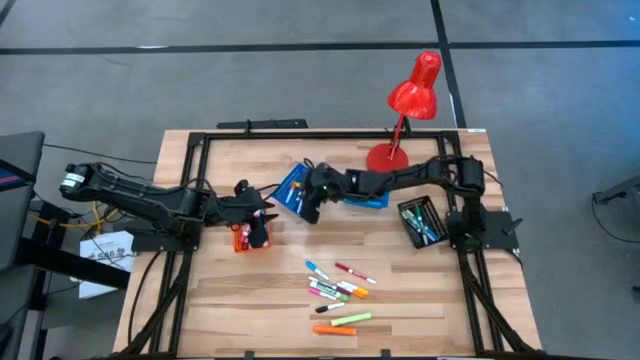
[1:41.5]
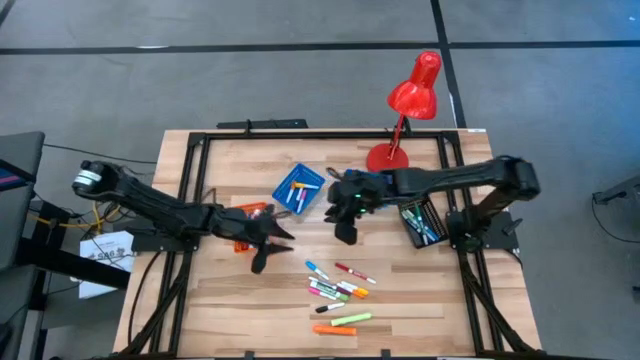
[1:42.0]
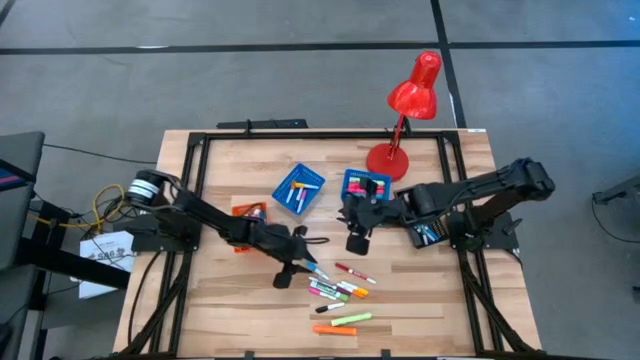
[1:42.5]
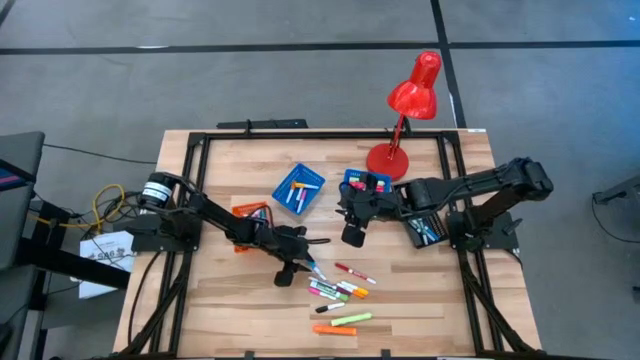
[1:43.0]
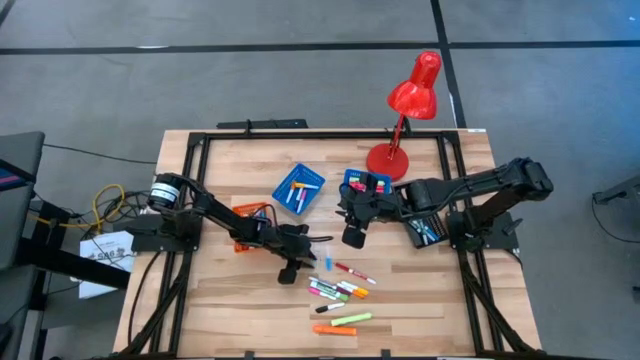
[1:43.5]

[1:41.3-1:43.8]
Task: Pick & Place Markers
Put the small light blue highlighter pen into the left blue bin

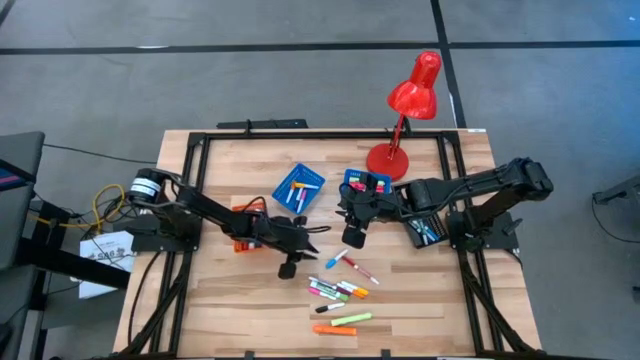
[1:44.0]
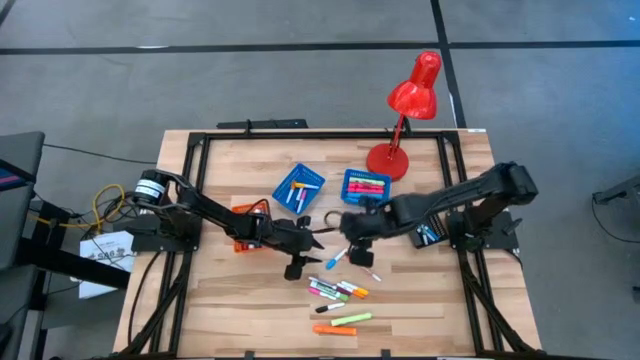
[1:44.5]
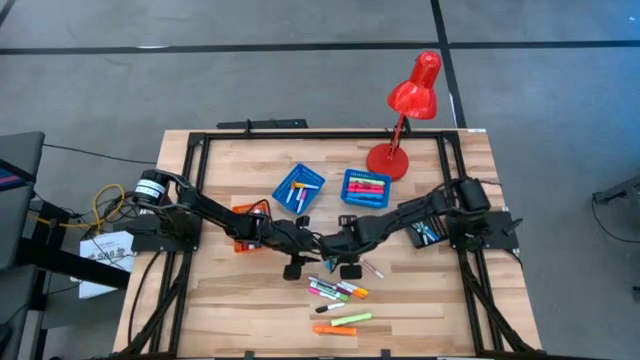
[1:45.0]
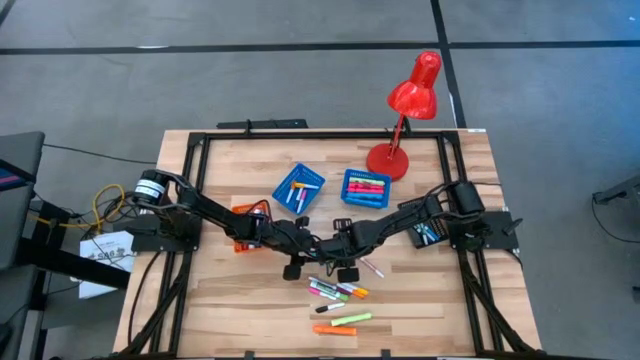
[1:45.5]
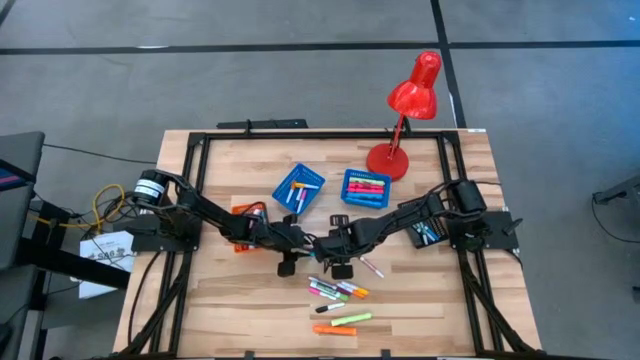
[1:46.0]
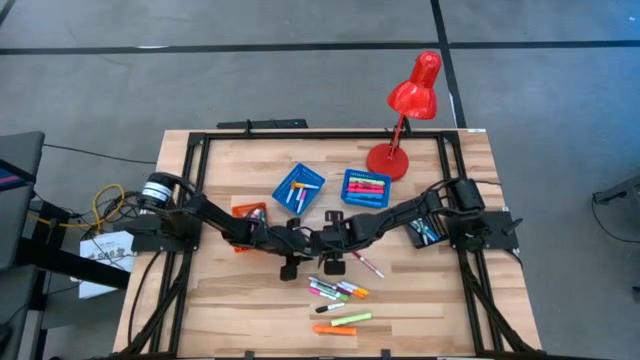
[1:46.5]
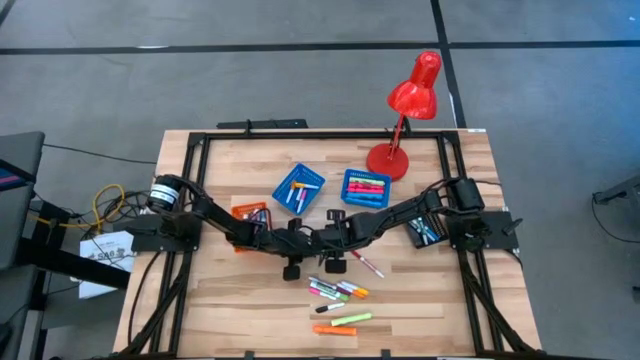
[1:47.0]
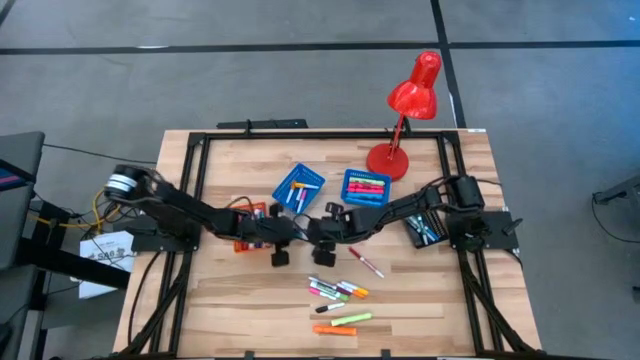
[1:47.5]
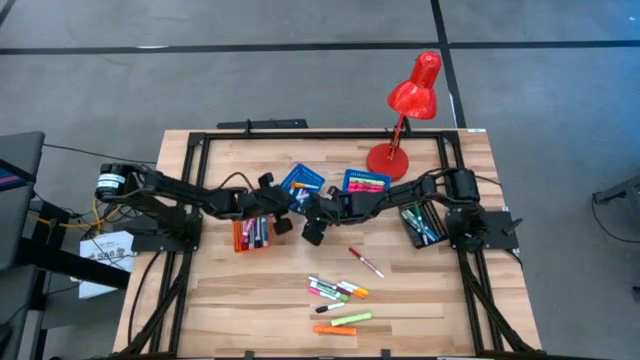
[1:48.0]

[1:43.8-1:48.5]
Put the small light blue highlighter pen into the left blue bin

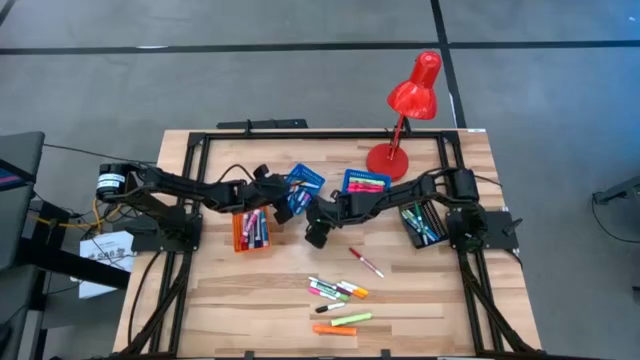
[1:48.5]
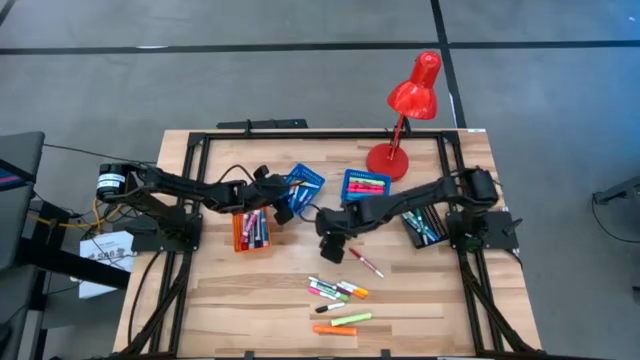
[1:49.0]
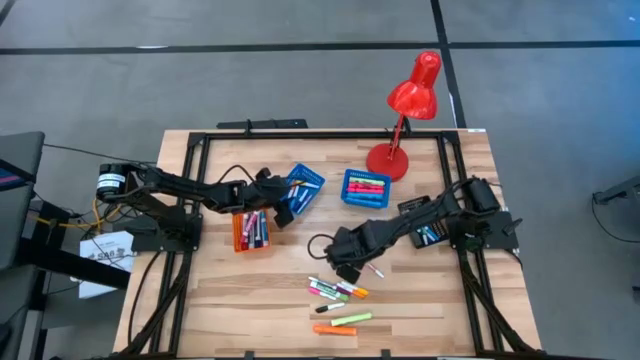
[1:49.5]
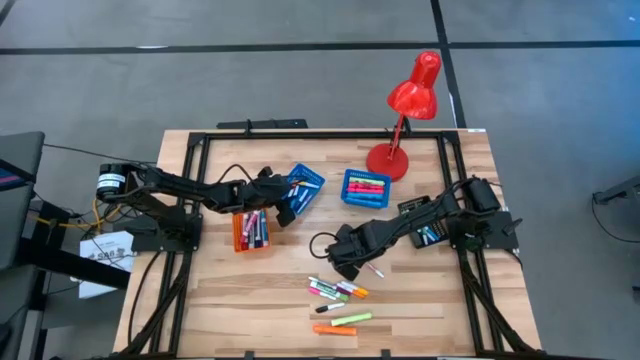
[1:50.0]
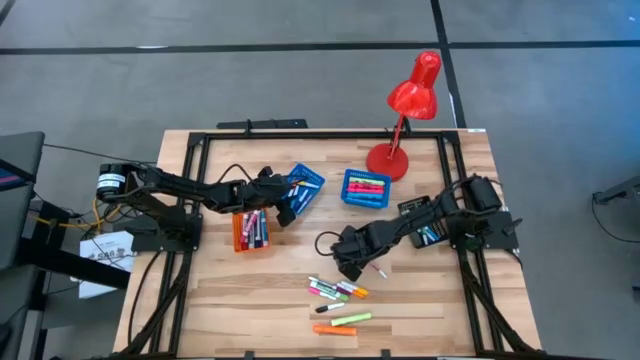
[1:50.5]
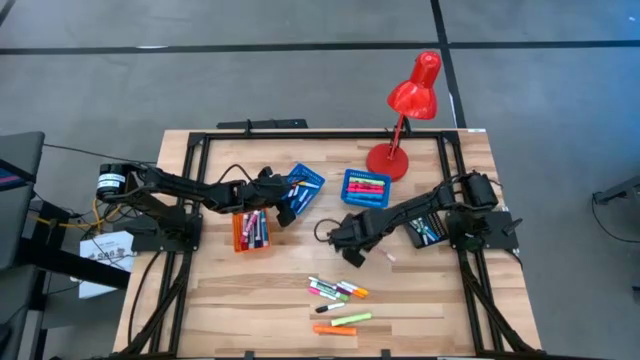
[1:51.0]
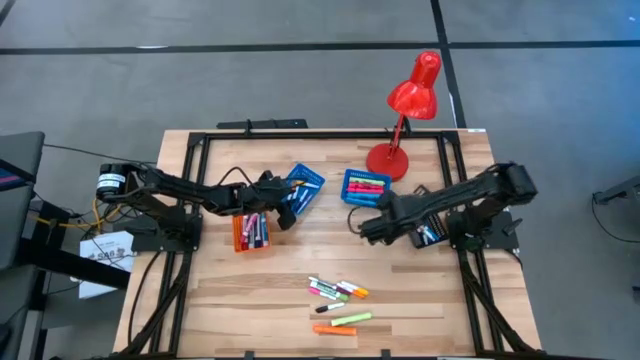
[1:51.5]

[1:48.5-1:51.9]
Put the small red marker pen into the black bin

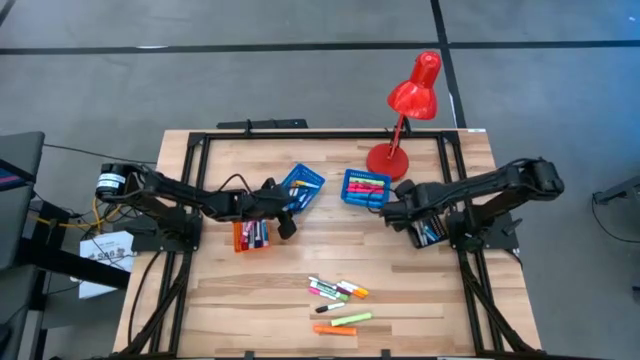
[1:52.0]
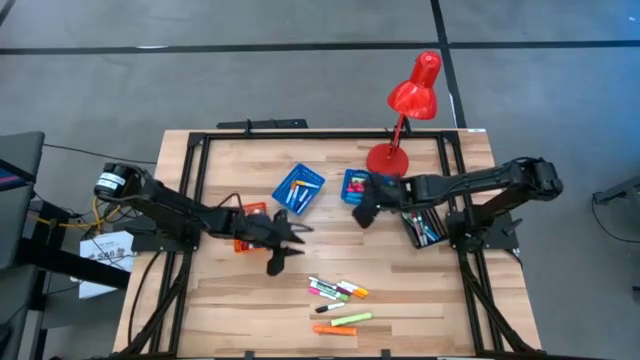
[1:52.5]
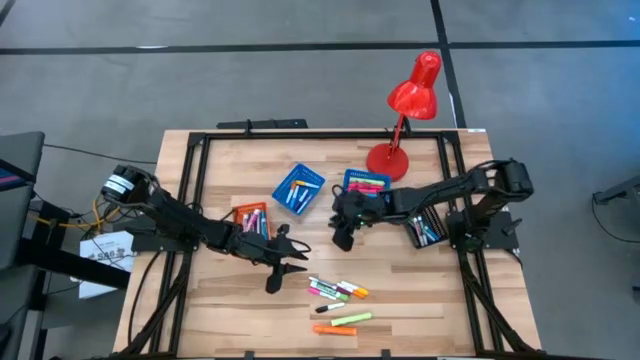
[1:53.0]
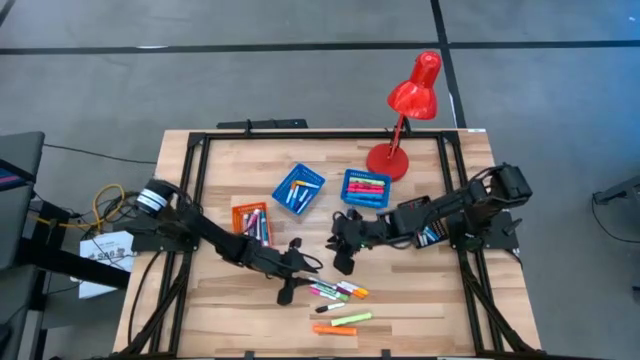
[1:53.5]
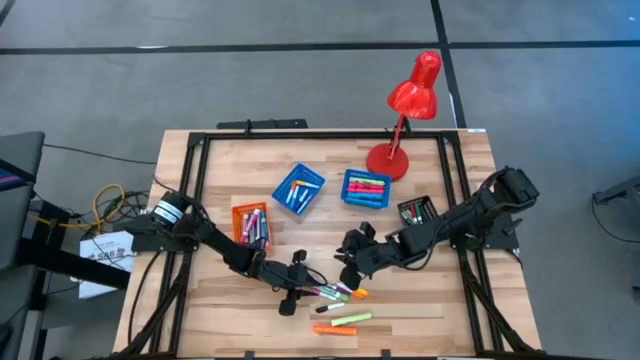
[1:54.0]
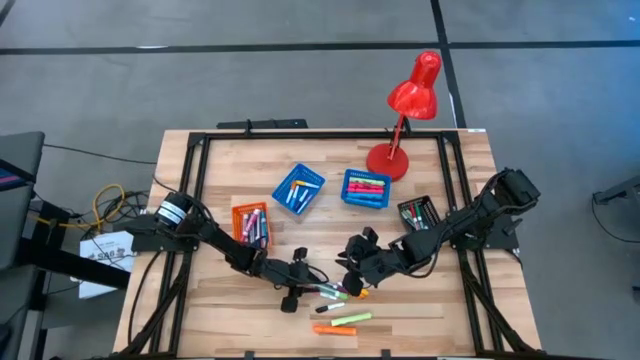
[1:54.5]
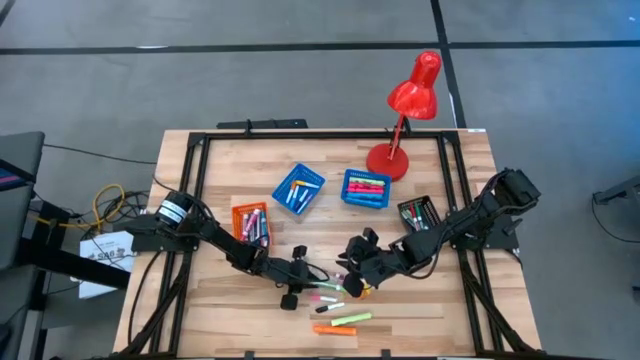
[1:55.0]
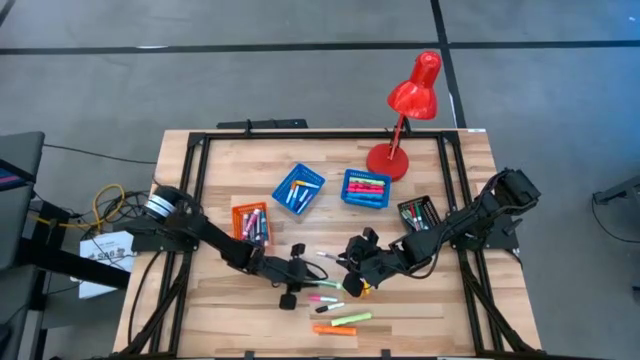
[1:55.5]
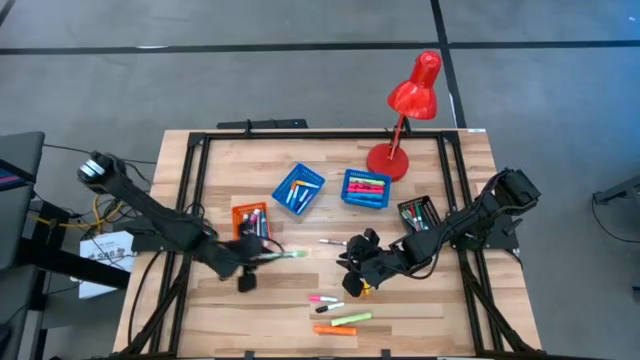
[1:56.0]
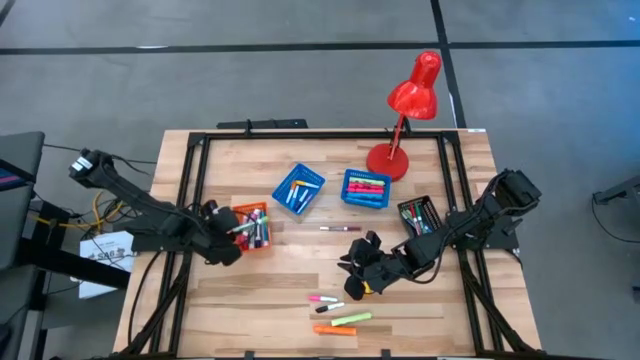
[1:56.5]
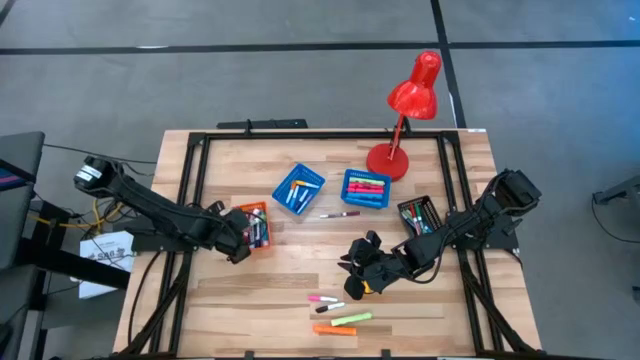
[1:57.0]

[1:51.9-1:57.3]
Put the large light green marker pen into the orange bin

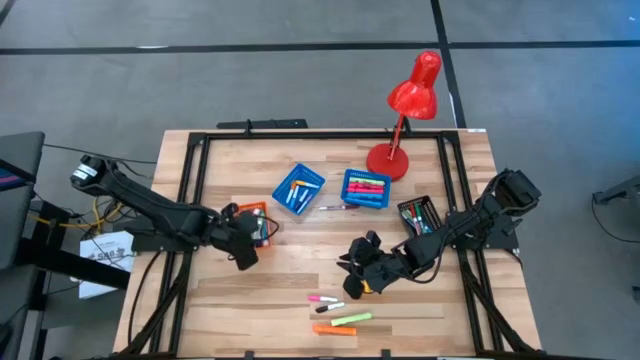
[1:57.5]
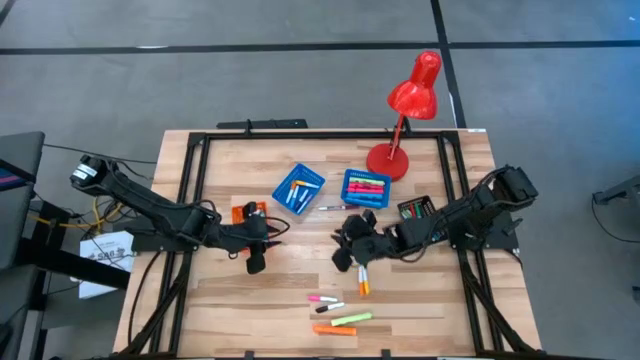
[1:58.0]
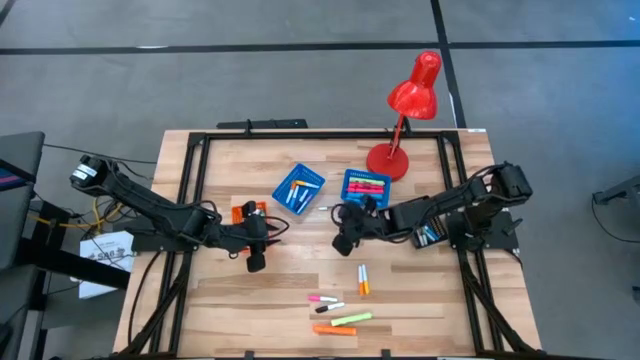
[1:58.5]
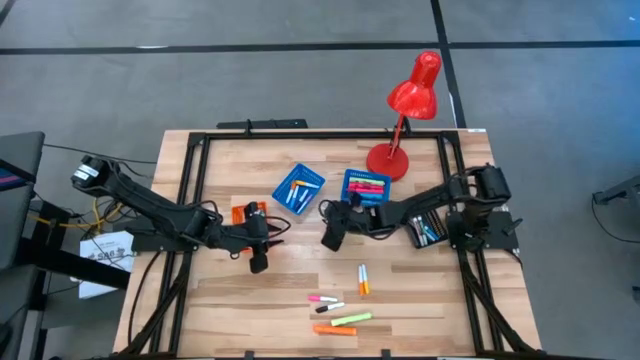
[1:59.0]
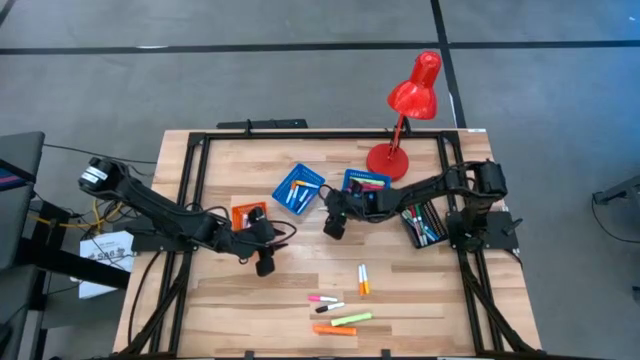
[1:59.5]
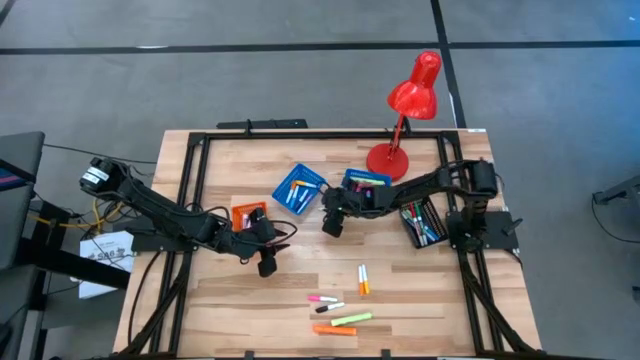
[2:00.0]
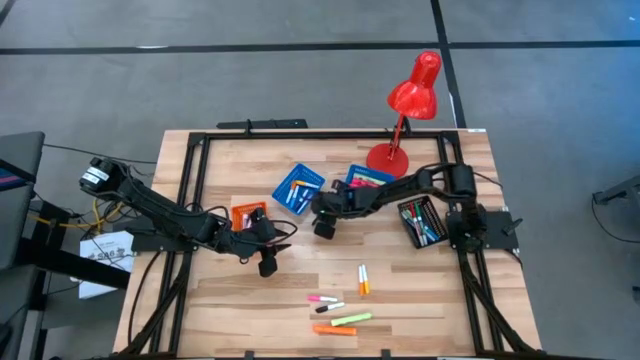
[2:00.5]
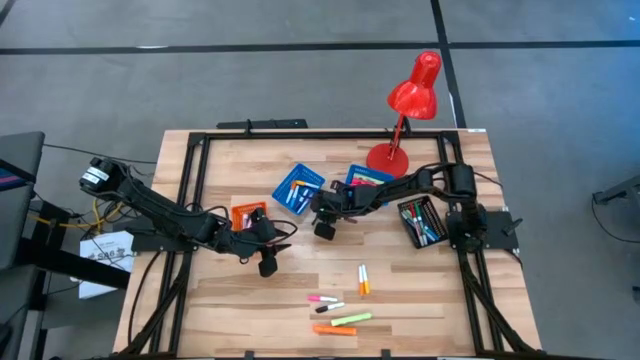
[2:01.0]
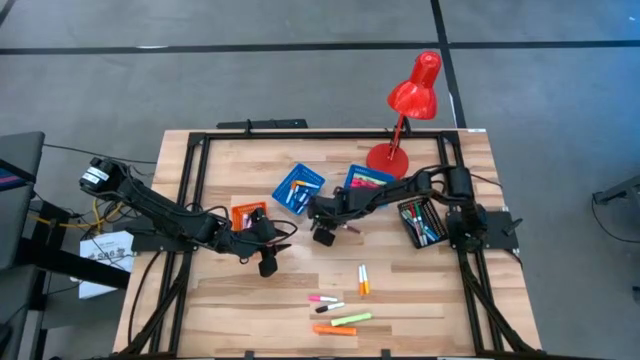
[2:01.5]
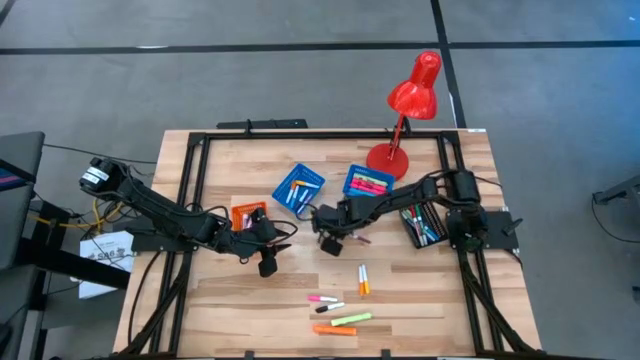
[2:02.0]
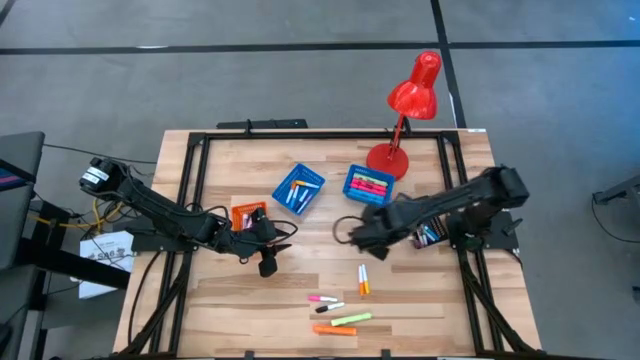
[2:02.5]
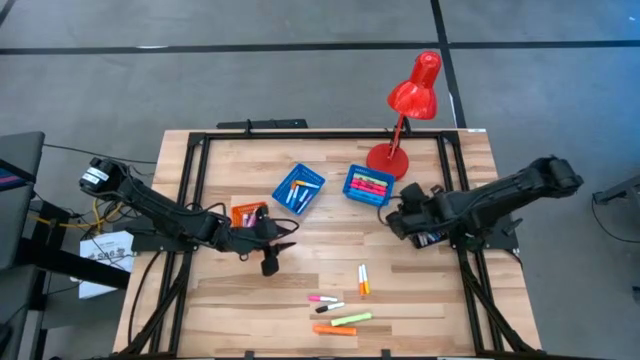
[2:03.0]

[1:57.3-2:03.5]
Put the small violet marker pen into the black bin
